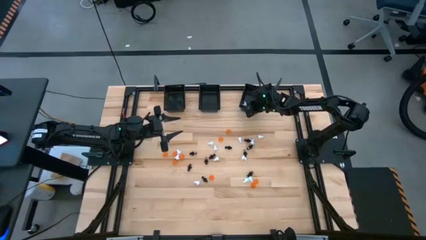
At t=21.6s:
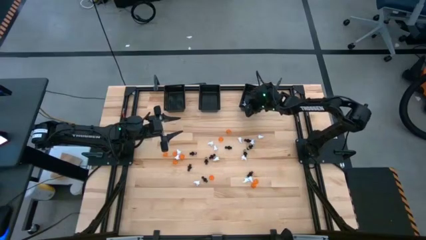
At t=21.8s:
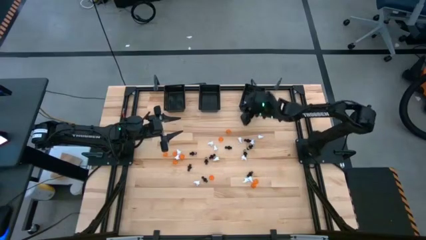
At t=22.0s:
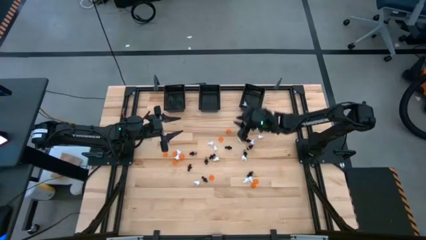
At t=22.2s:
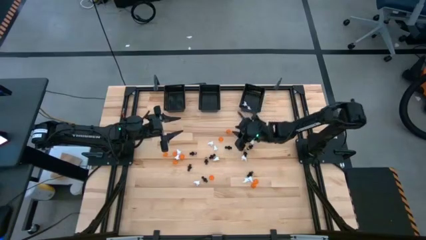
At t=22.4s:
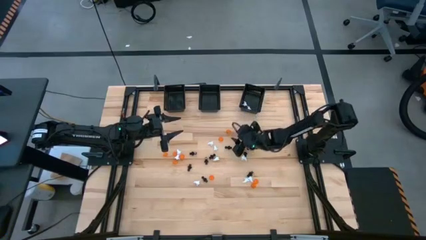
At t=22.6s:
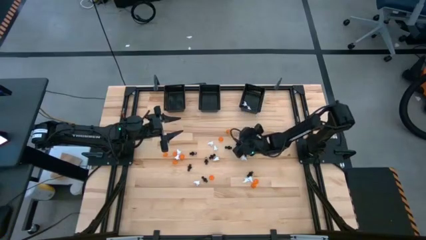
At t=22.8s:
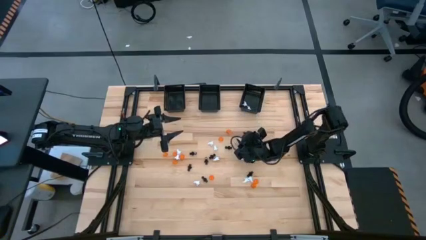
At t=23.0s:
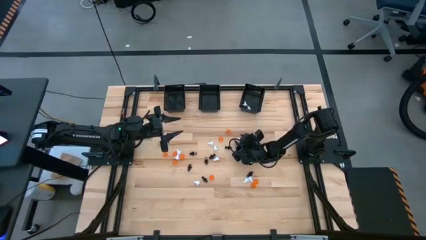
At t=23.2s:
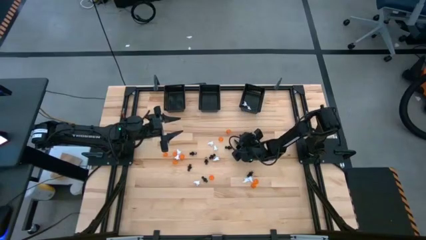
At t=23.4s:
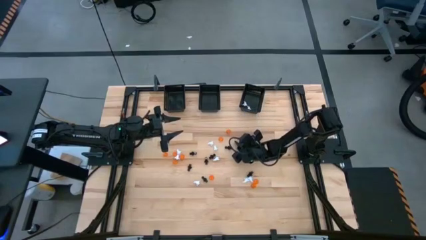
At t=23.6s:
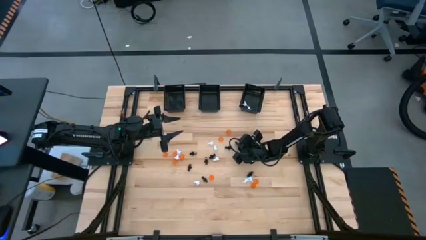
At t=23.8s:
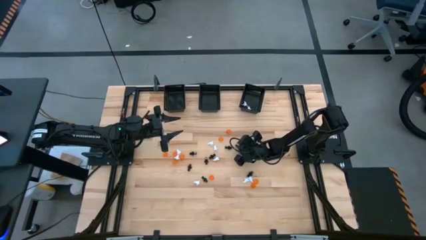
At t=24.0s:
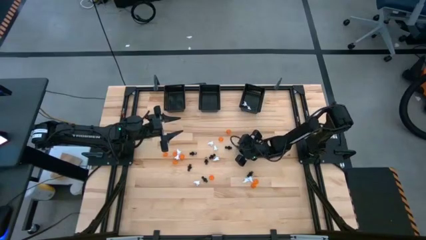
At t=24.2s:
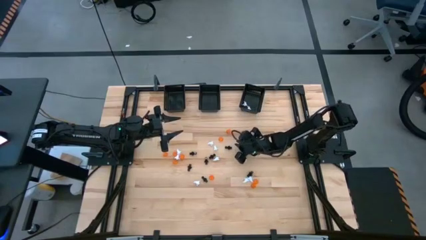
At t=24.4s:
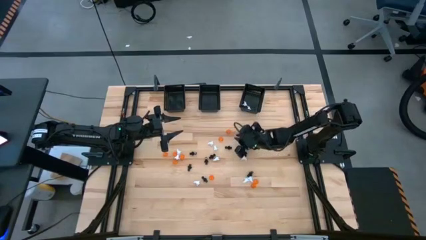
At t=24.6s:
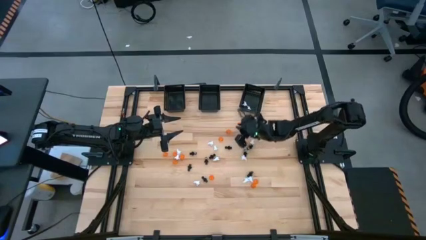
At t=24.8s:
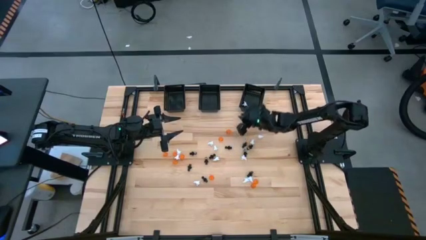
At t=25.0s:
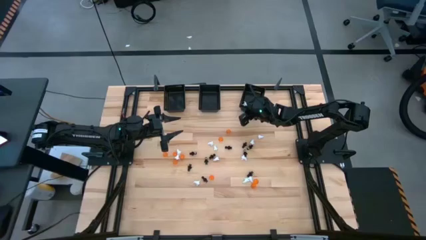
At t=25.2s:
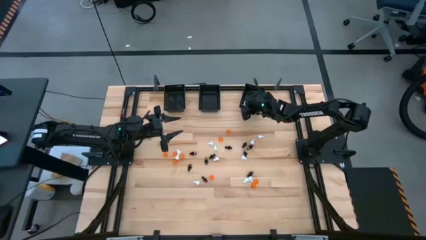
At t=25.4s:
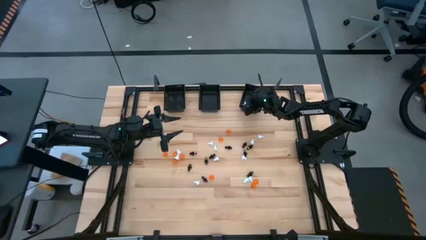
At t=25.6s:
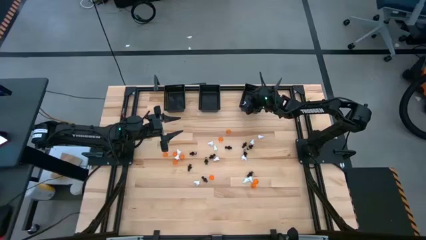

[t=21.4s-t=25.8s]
Task: Sort Halloween decoration
Put the white ghost toy into the right black basket

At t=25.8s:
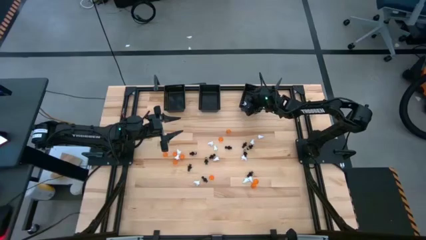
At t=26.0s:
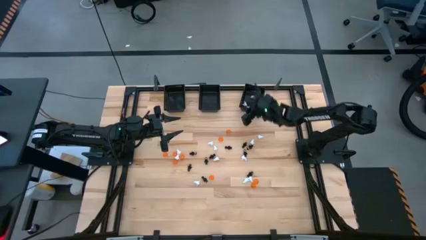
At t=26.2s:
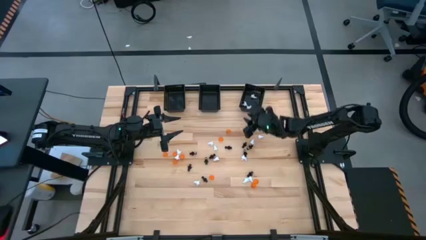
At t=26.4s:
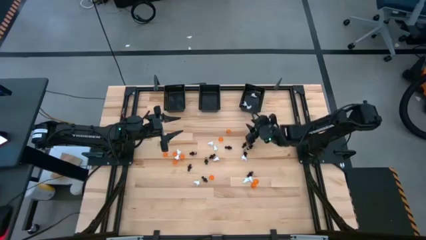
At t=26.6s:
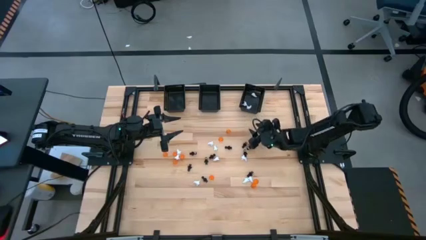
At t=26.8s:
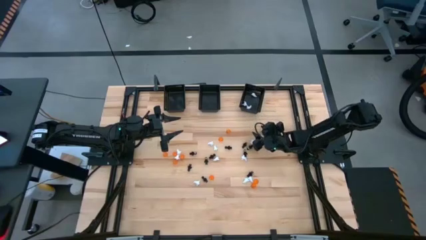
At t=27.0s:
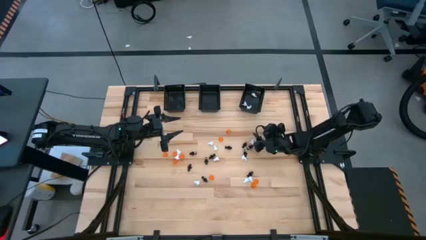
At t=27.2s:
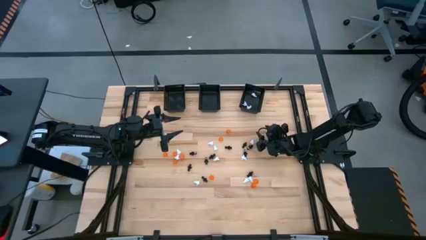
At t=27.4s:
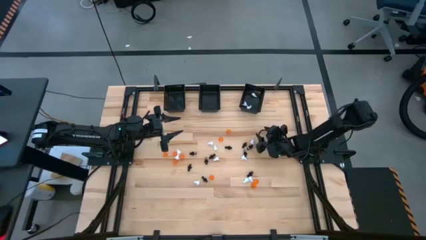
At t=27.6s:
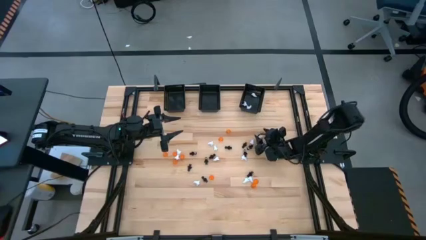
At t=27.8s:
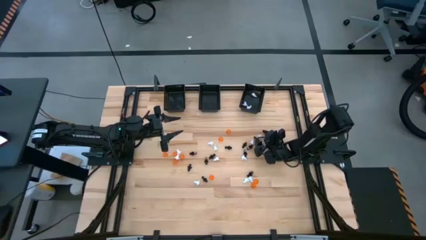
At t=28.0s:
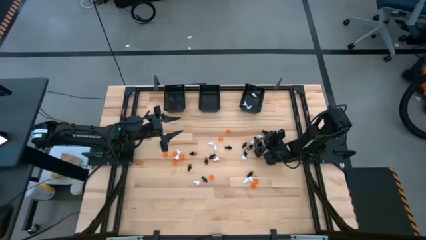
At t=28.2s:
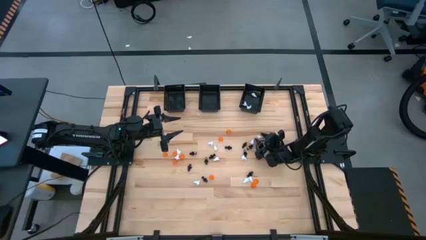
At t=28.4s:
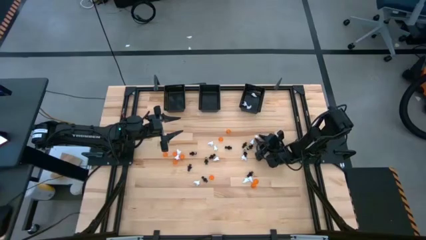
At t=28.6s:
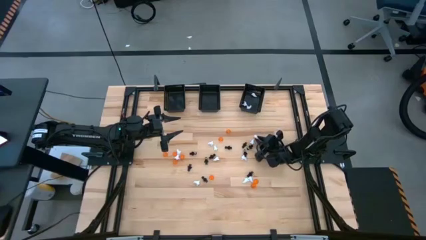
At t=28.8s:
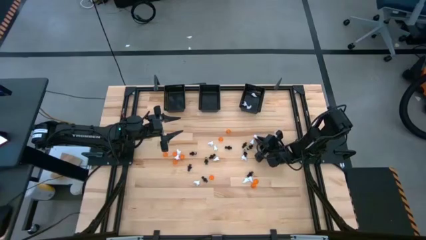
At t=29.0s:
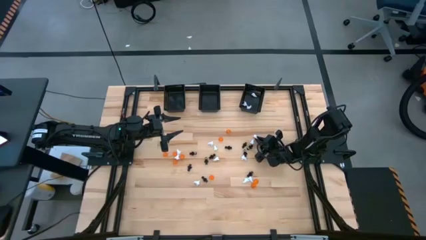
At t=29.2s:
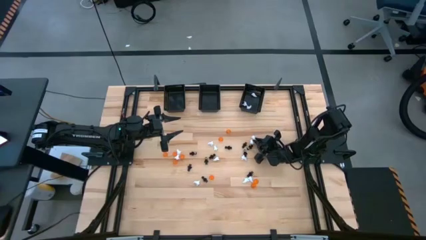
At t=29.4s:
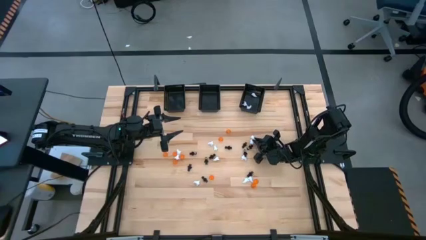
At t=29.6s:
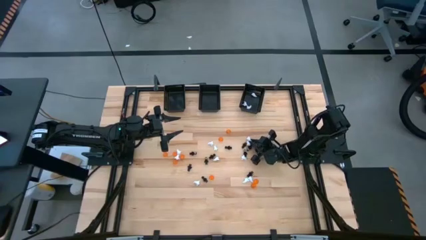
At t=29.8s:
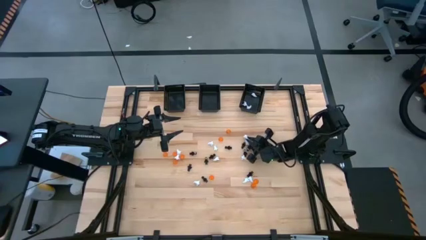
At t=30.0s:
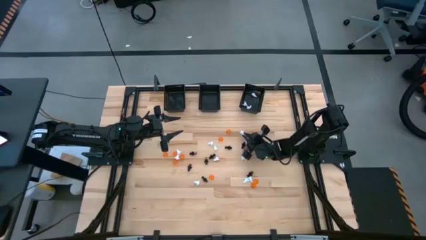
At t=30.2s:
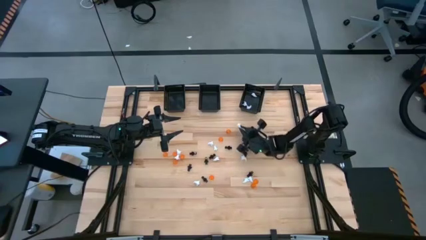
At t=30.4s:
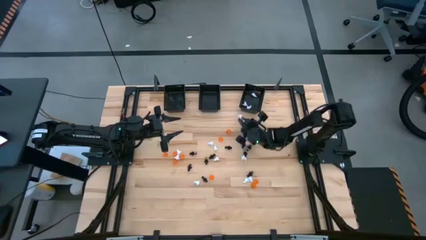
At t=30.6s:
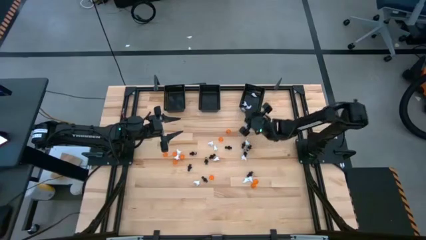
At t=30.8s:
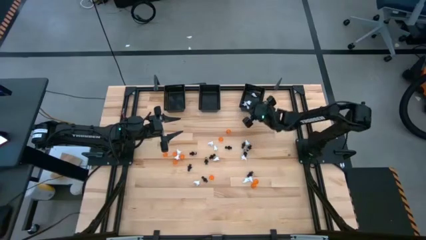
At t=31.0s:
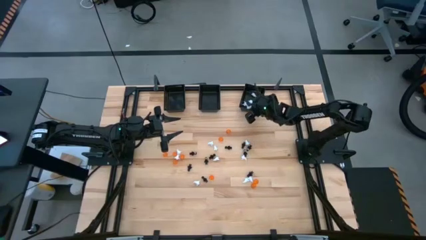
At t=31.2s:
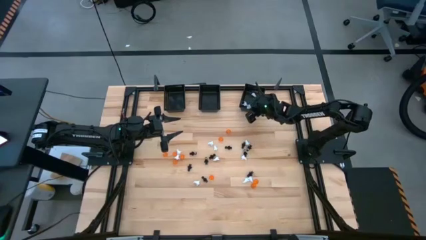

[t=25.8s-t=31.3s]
Put the white ghost toy into the right black basket

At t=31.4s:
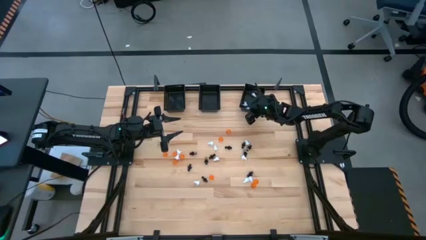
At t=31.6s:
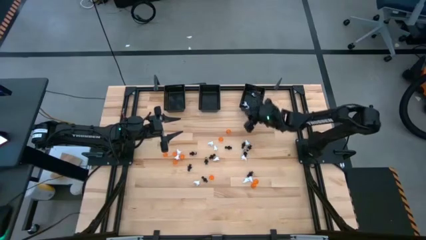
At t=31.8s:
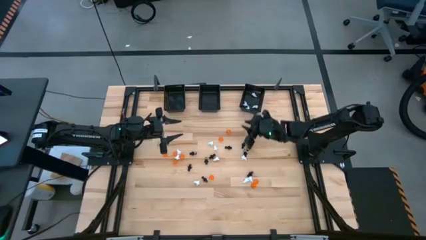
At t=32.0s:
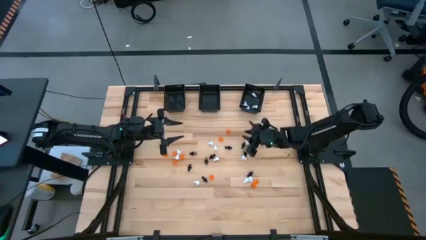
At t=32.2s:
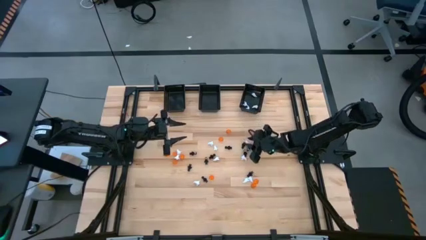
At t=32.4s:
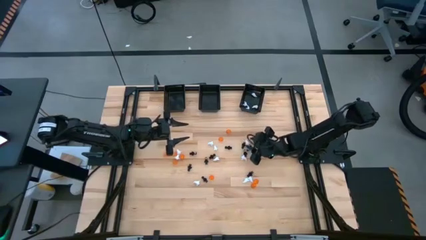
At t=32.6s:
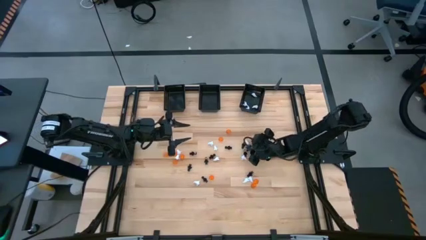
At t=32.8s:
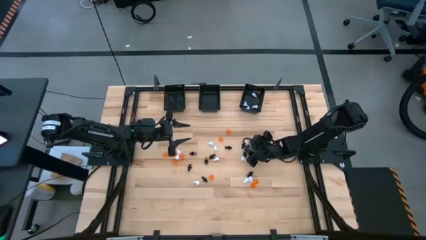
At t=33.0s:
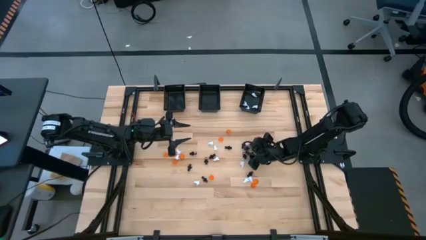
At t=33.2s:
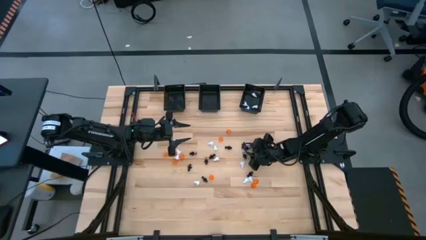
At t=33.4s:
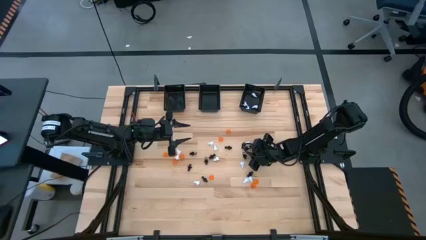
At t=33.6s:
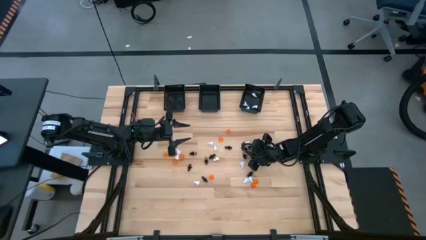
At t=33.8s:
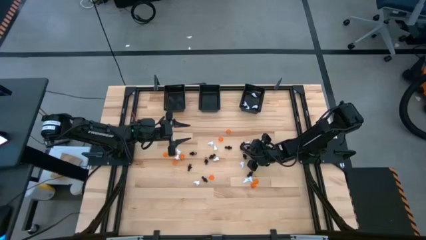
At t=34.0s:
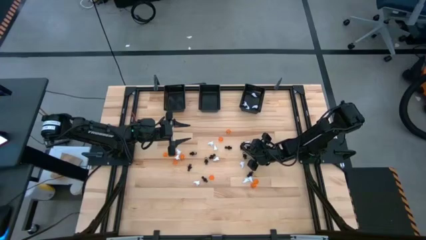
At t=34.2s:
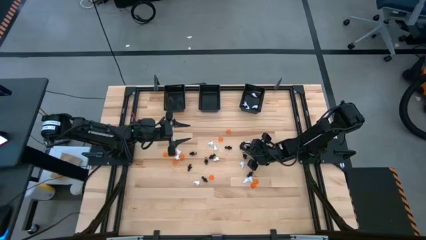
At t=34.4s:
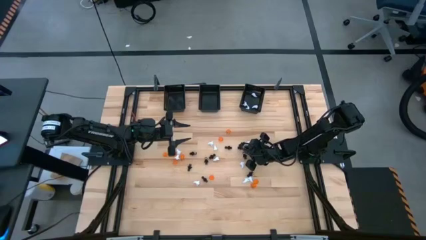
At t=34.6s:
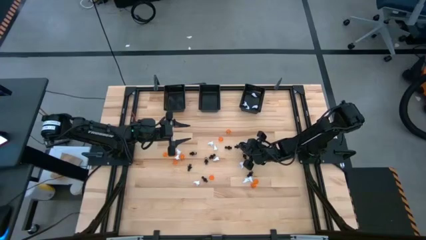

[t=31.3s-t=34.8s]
Put the black skeleton toy into the black middle basket

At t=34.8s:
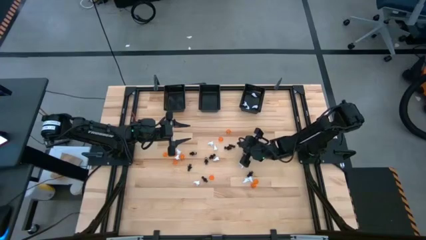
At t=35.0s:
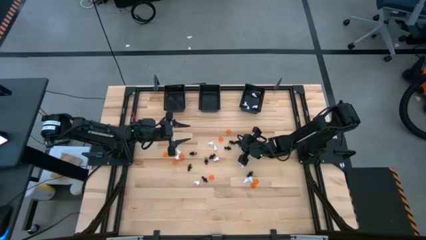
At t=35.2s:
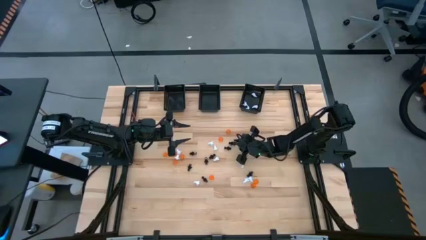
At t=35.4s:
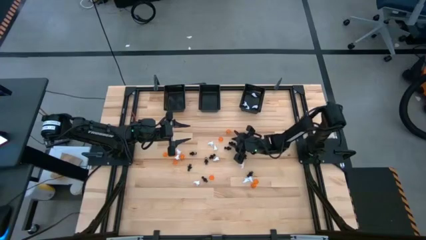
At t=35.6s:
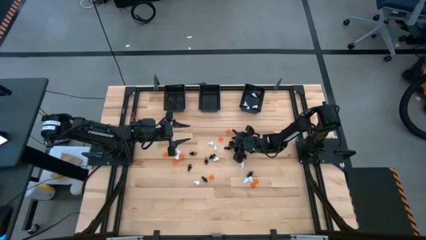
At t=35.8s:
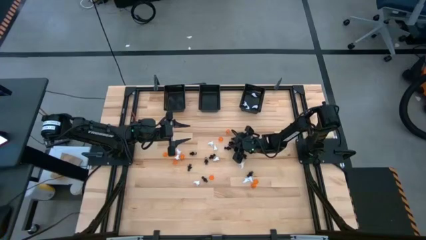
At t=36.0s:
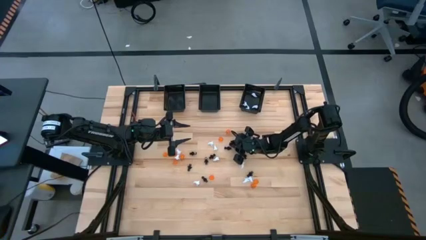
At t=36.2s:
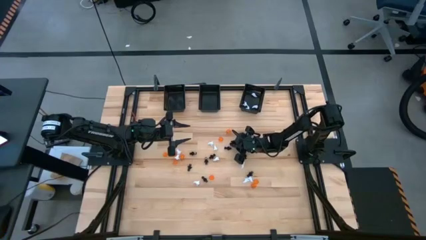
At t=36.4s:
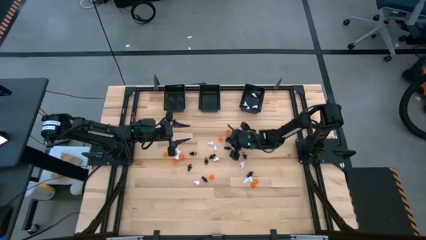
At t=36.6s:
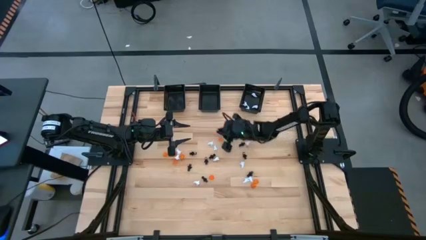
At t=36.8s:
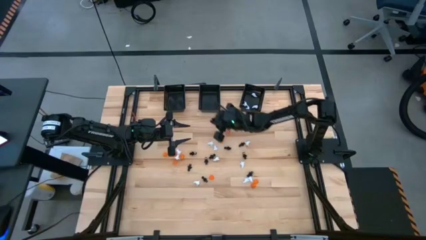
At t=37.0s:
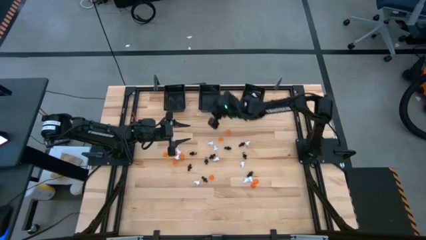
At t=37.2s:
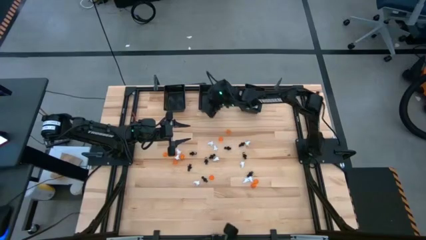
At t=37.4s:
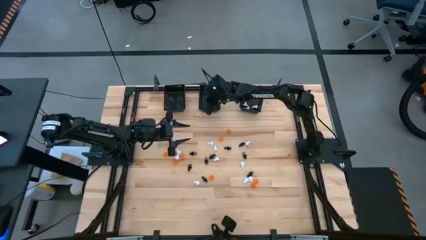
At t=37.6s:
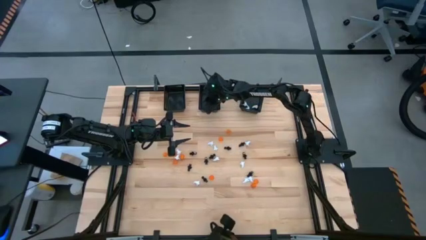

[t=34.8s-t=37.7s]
Put the black skeleton toy into the black middle basket
